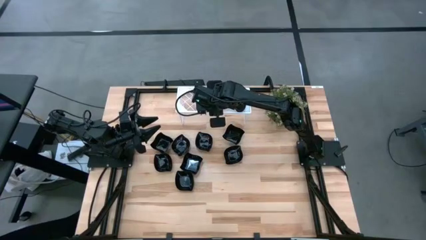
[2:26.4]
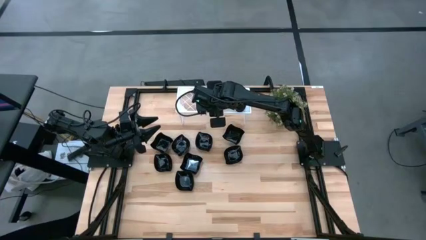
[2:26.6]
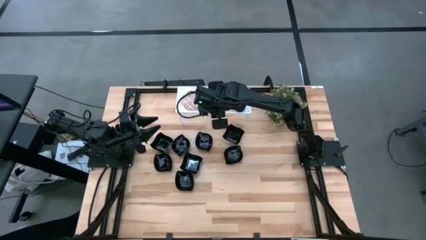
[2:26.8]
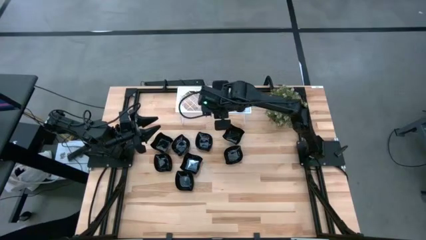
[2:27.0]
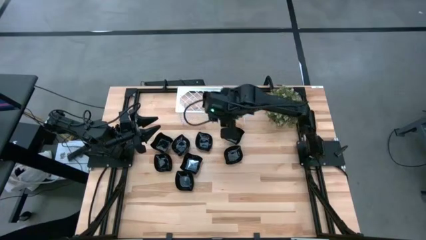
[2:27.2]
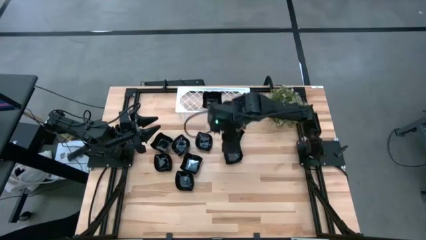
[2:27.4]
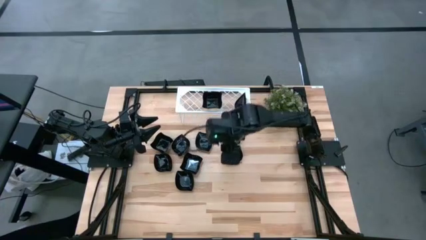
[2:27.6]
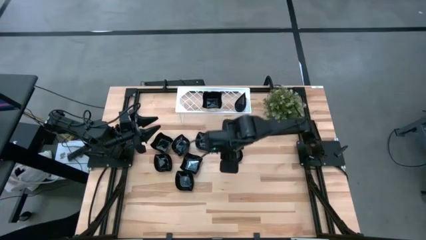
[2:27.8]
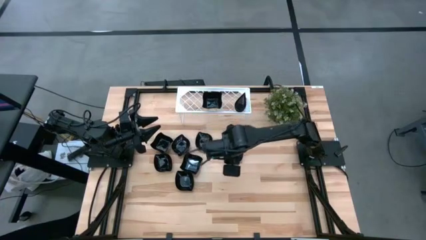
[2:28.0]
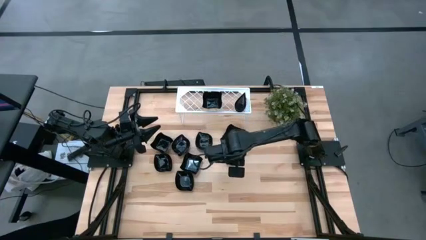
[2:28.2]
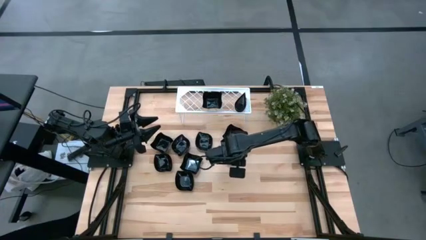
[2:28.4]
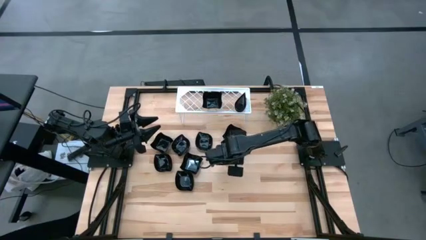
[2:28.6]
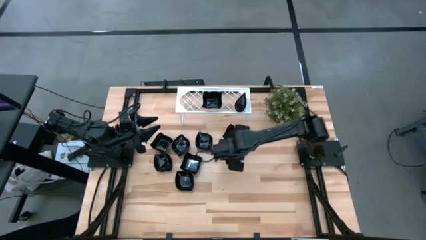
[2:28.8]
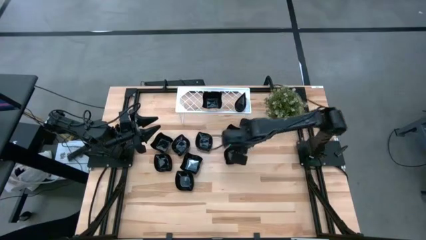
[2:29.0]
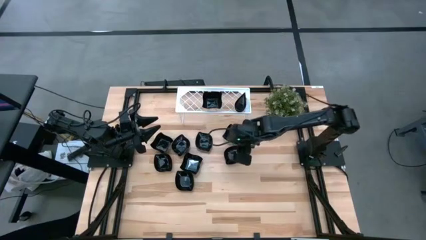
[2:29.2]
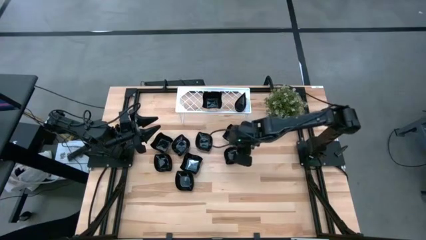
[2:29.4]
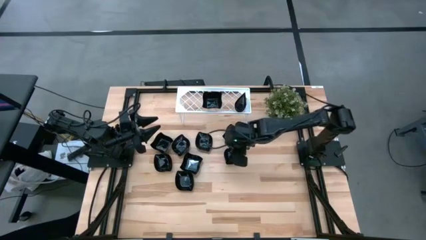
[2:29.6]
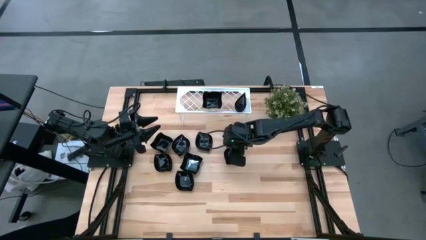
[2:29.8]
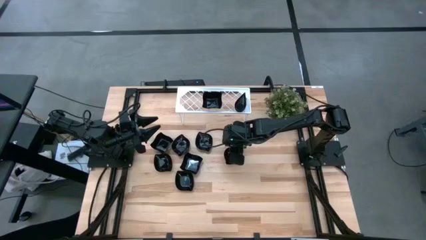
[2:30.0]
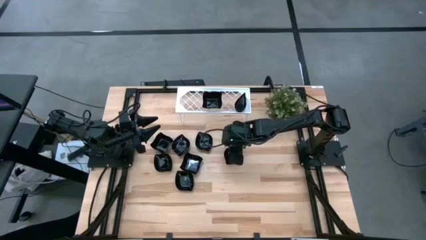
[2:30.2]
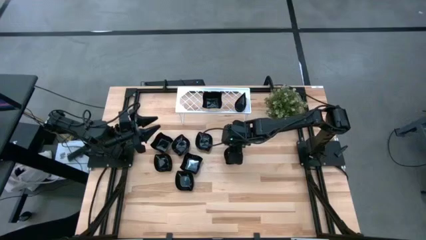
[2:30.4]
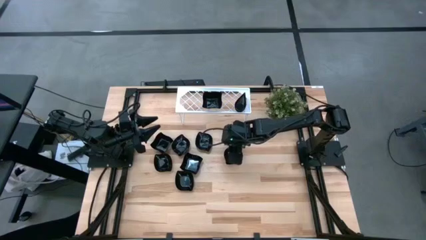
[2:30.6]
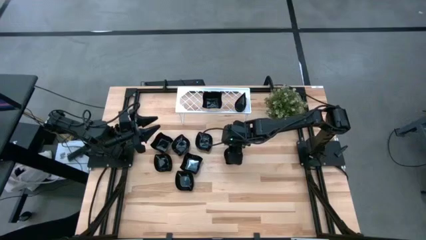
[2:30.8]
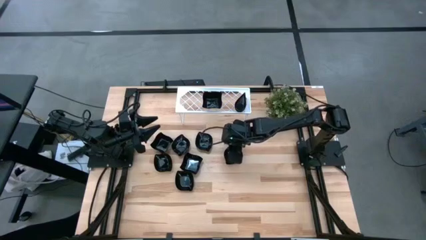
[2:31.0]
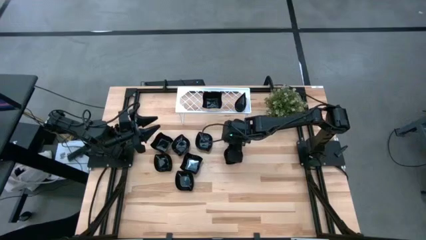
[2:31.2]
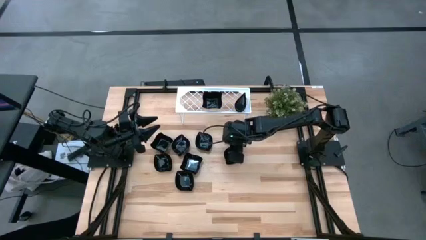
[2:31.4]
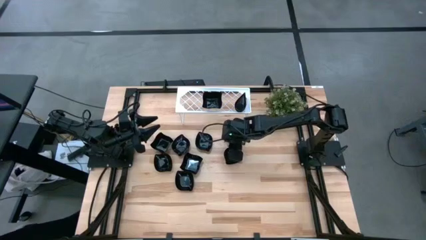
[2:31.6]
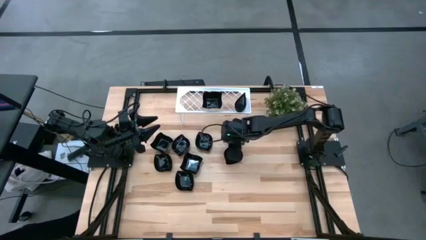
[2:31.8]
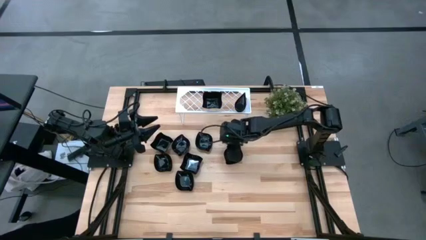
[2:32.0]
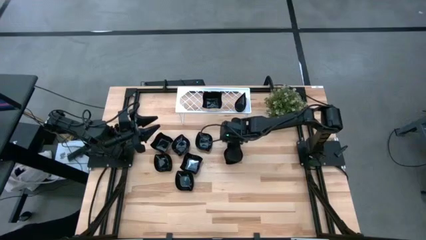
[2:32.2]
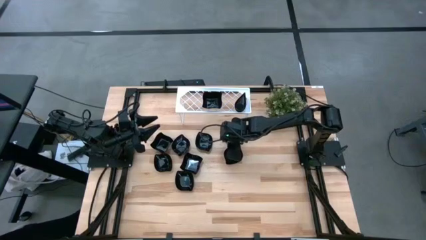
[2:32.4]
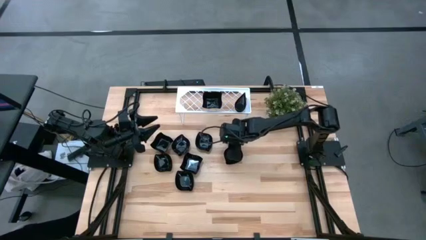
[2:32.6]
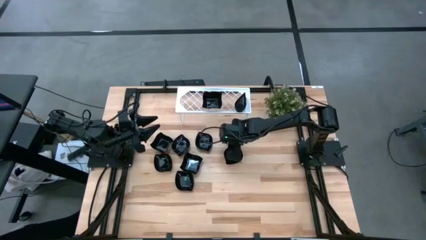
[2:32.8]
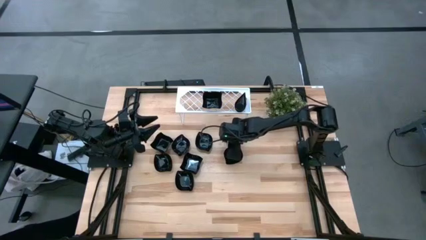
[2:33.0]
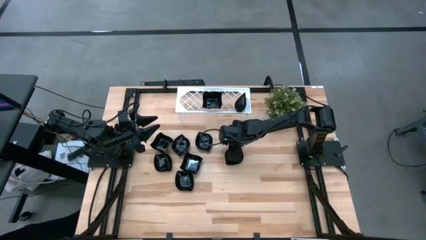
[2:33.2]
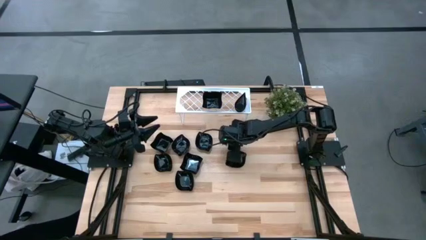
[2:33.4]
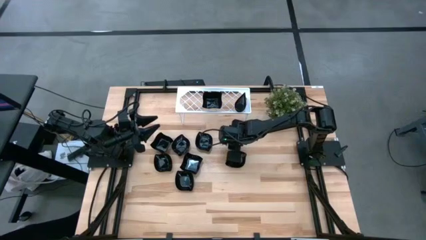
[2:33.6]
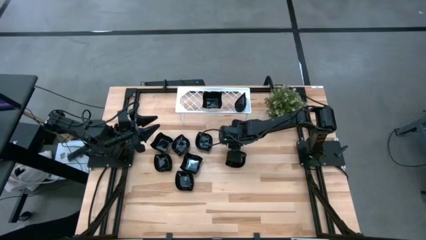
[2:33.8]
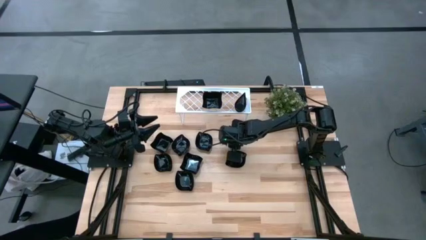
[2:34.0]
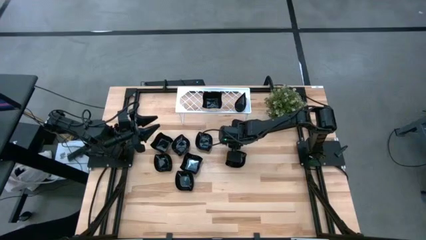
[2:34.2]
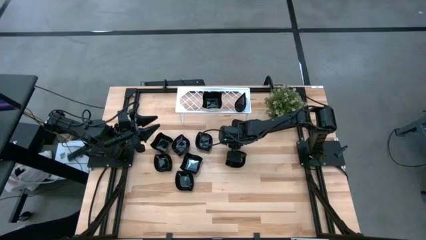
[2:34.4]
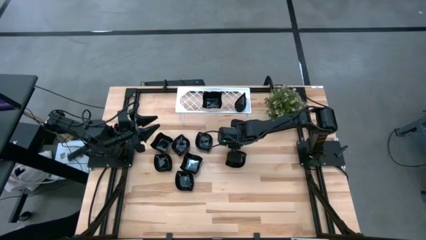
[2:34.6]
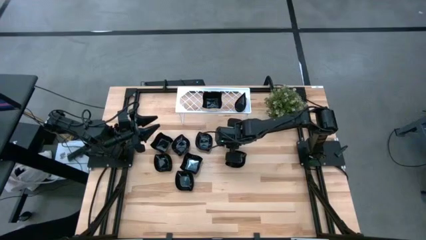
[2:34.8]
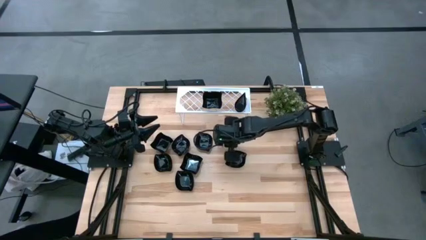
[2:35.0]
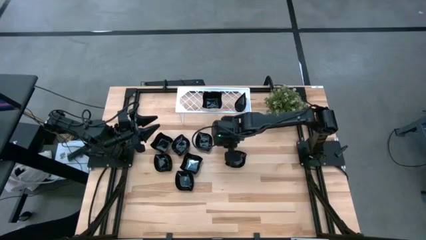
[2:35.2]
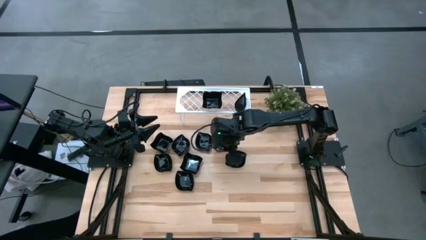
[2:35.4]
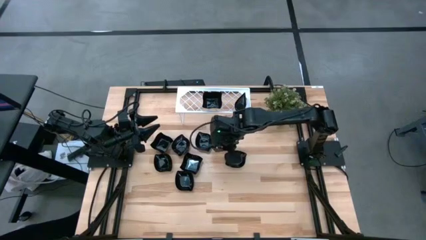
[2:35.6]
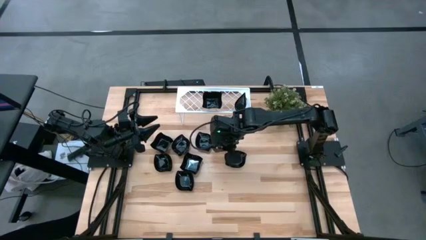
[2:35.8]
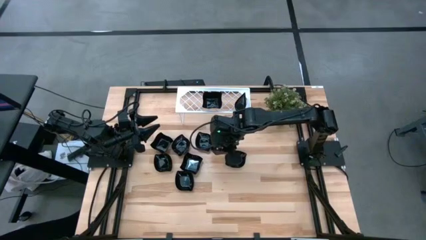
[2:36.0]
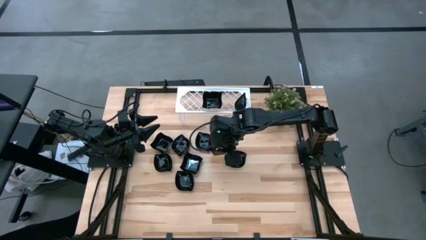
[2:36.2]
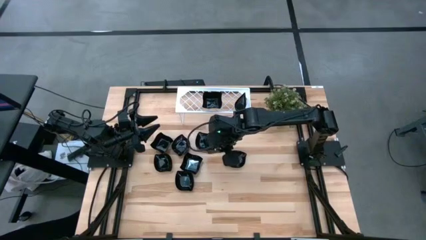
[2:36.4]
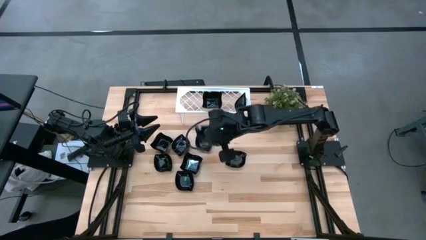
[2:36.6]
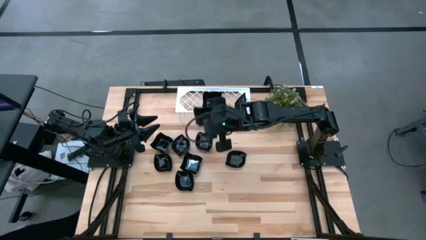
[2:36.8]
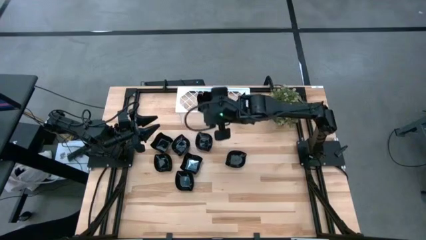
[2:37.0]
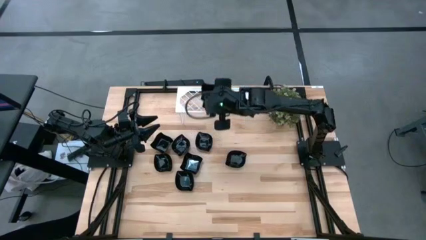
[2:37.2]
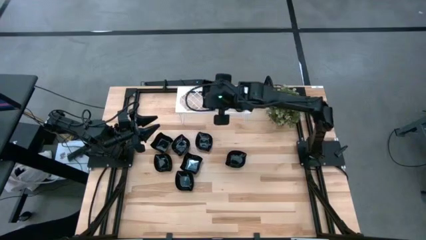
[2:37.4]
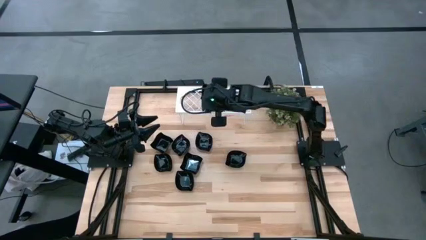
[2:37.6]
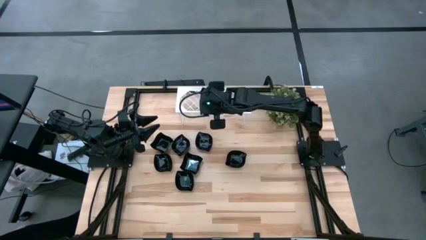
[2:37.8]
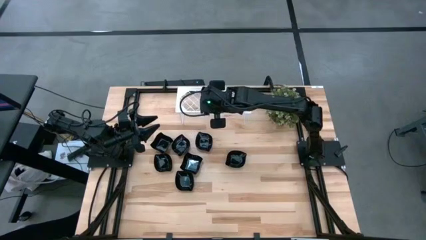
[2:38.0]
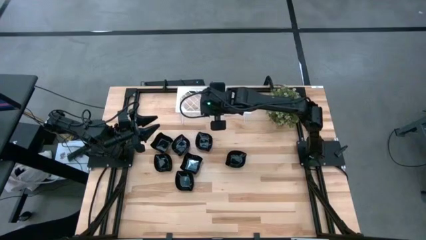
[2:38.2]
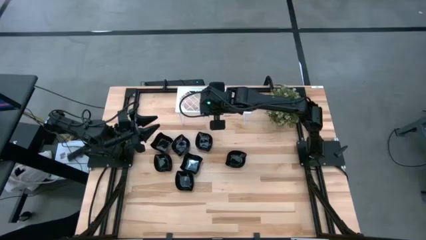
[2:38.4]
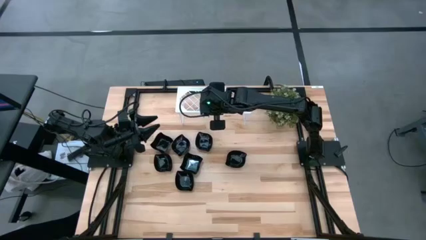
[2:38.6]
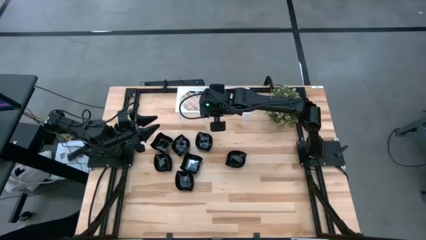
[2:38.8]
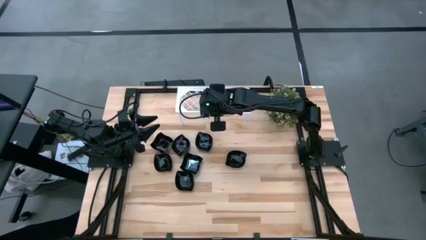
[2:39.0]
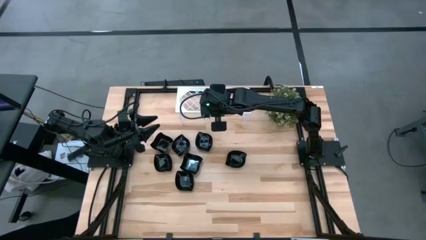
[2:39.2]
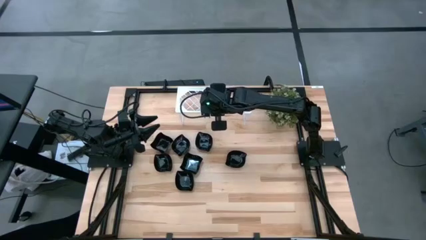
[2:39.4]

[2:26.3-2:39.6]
Task: Pick & Place Mini shaped plates
Stack the distorted square plate on top of the distorted square plate on the shelf
